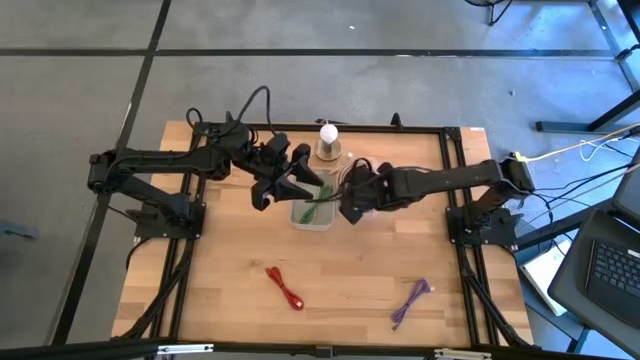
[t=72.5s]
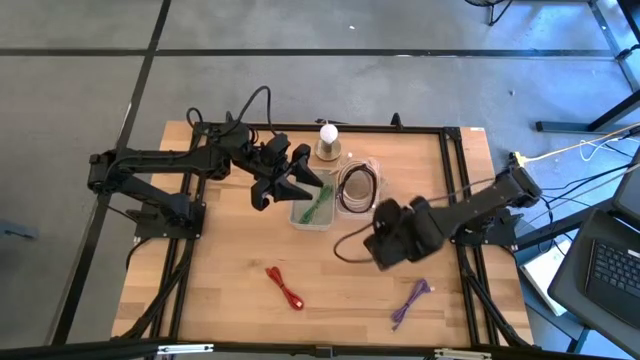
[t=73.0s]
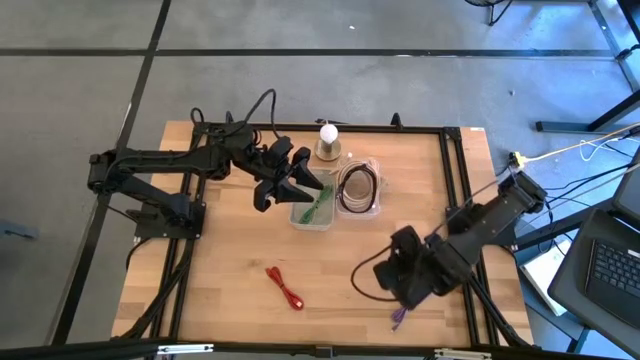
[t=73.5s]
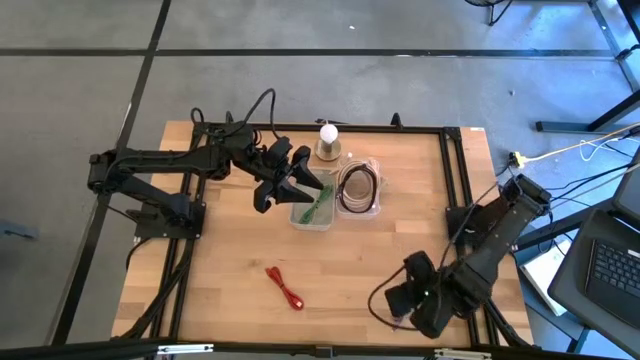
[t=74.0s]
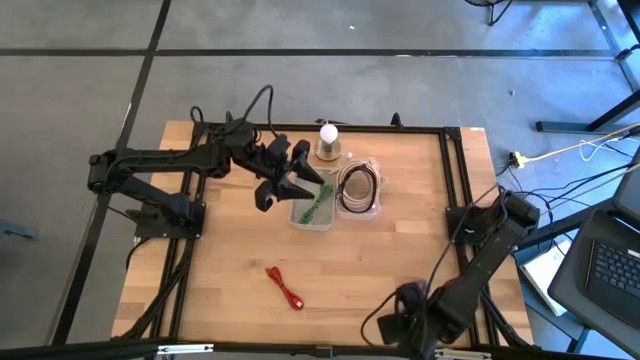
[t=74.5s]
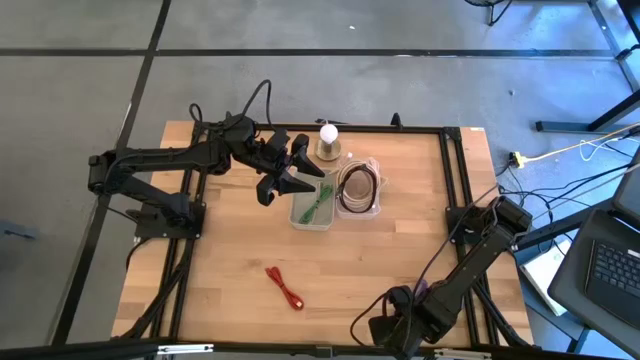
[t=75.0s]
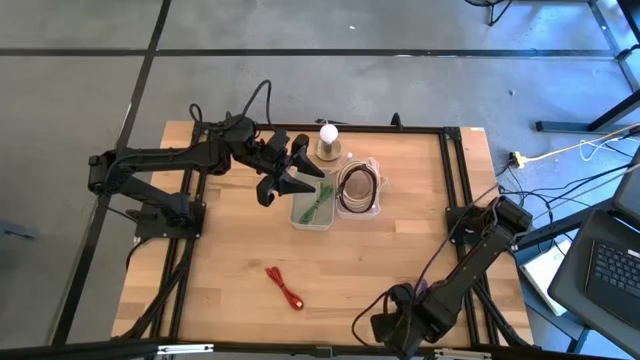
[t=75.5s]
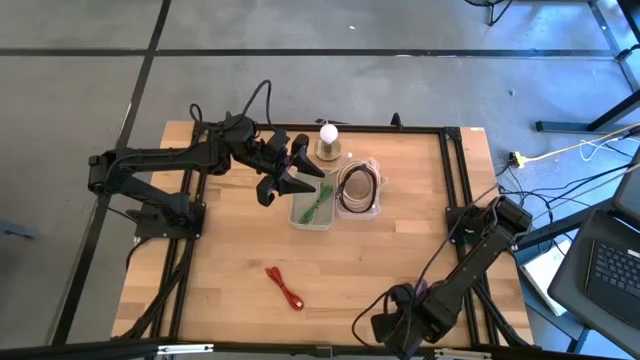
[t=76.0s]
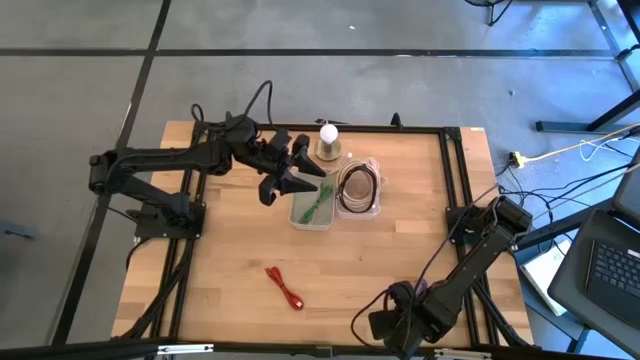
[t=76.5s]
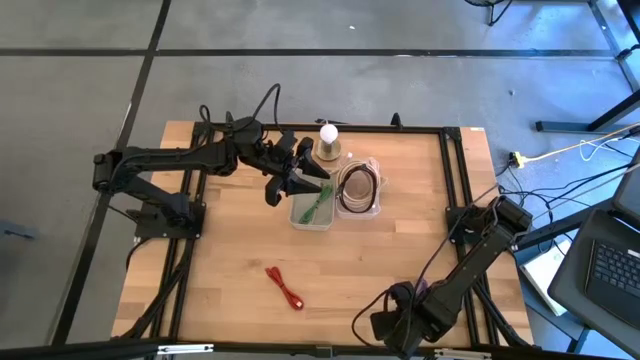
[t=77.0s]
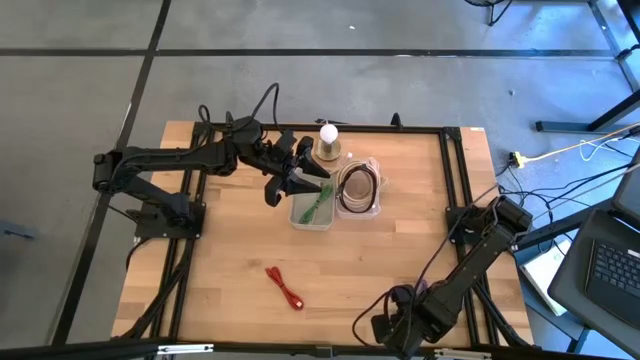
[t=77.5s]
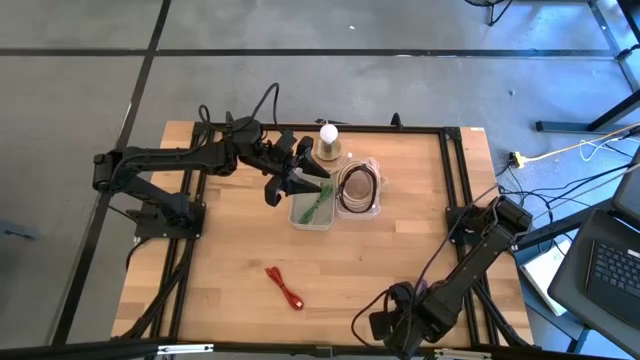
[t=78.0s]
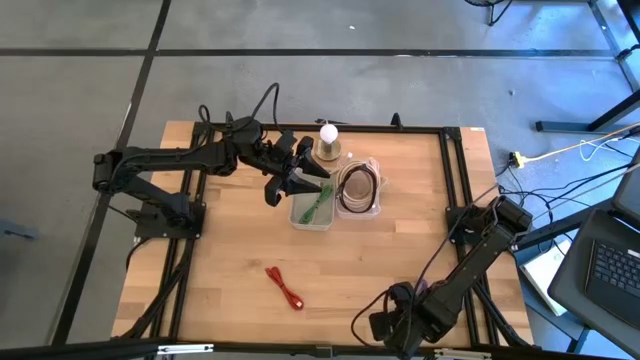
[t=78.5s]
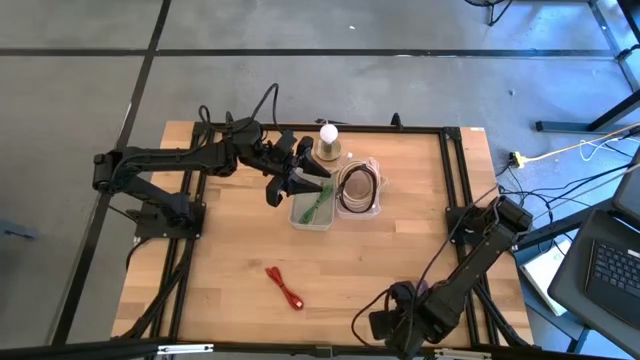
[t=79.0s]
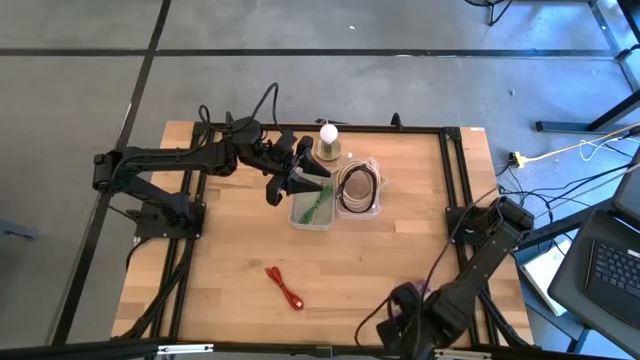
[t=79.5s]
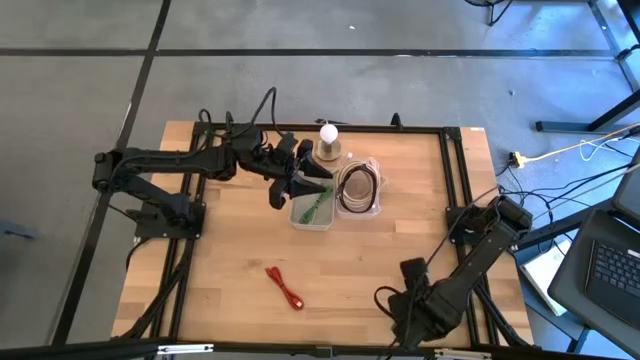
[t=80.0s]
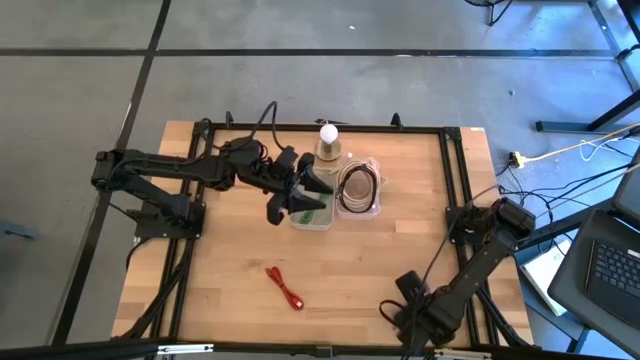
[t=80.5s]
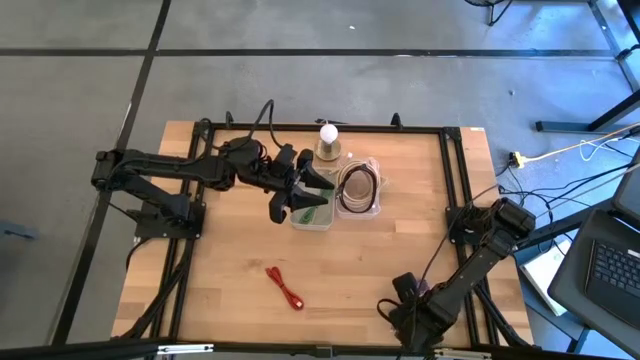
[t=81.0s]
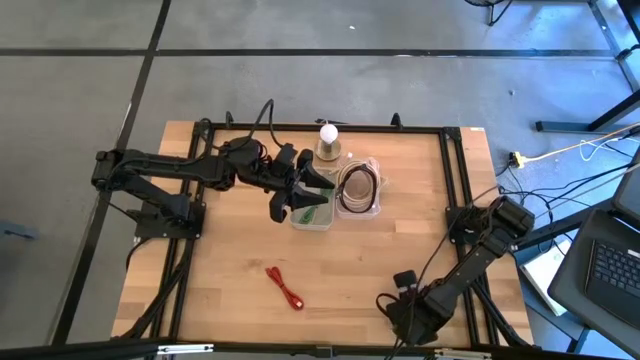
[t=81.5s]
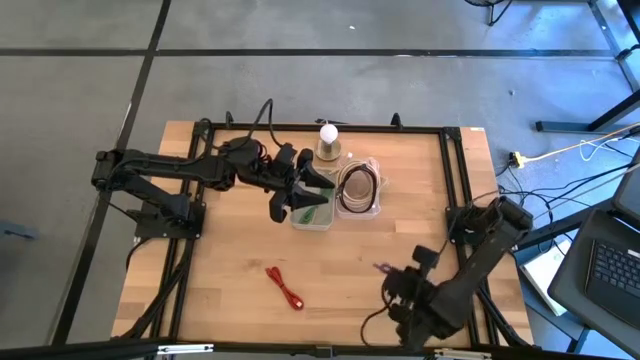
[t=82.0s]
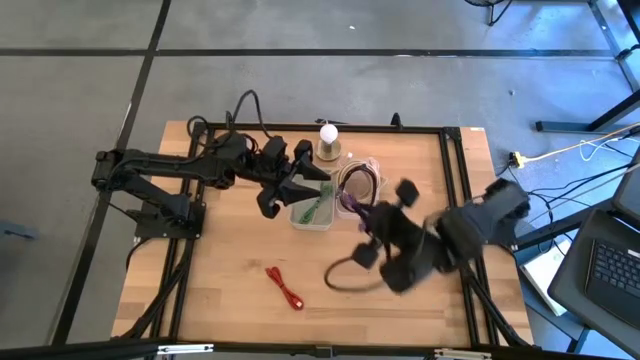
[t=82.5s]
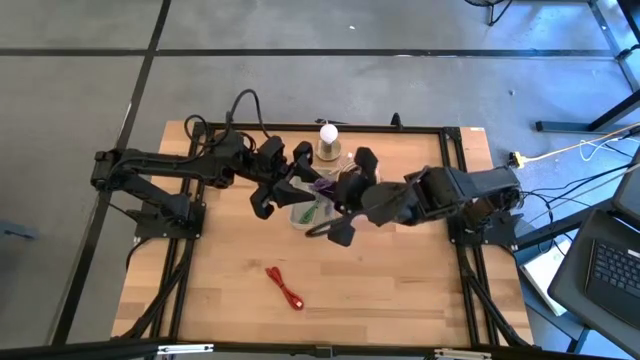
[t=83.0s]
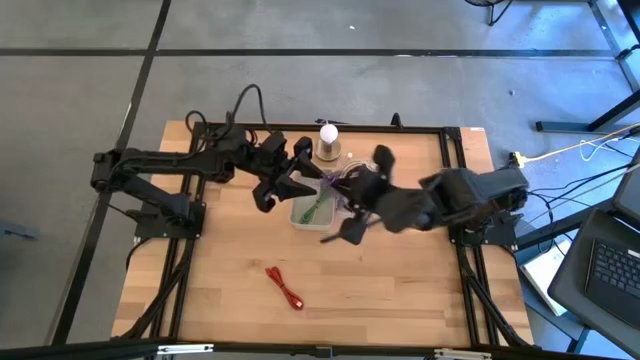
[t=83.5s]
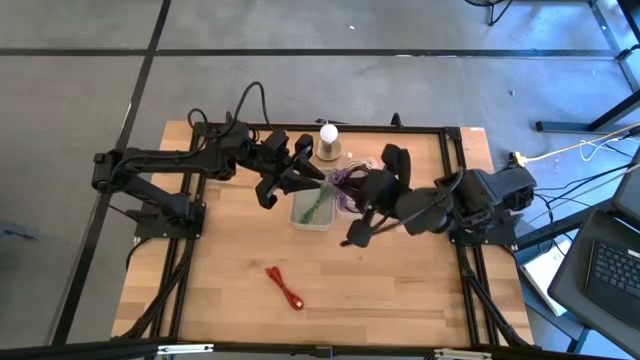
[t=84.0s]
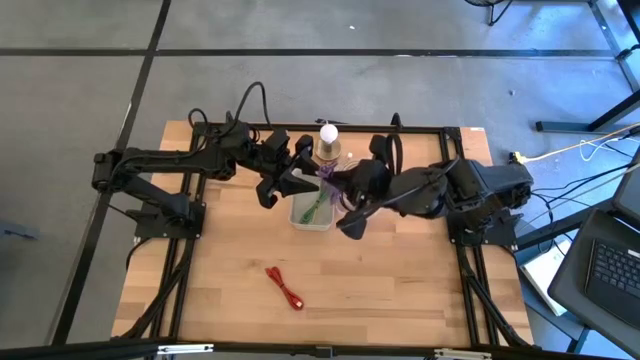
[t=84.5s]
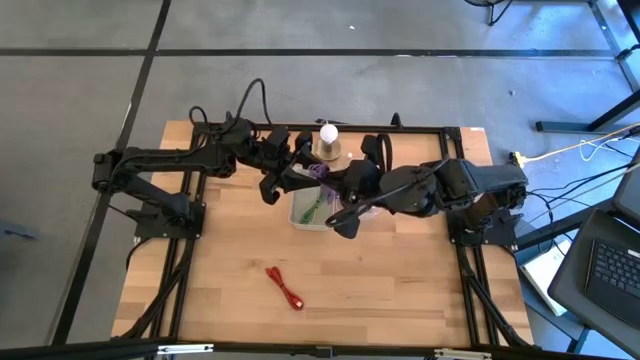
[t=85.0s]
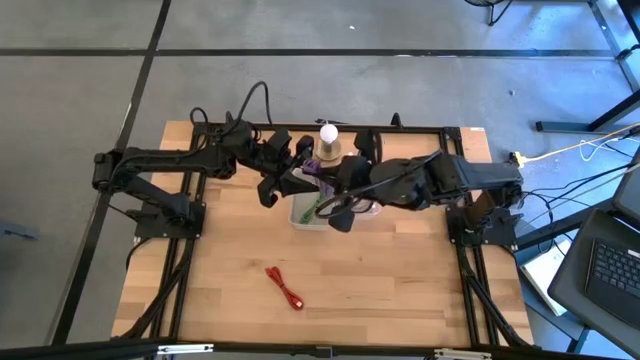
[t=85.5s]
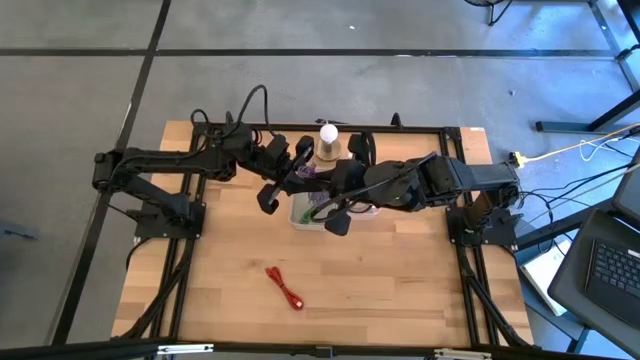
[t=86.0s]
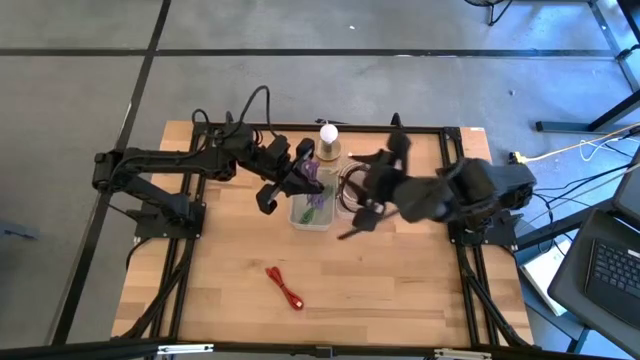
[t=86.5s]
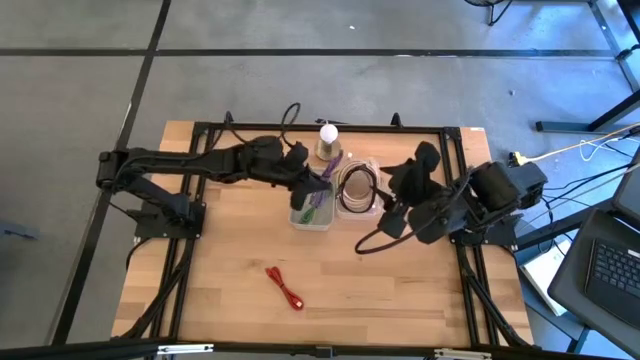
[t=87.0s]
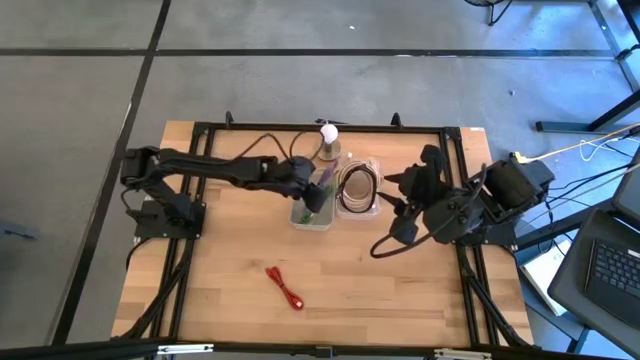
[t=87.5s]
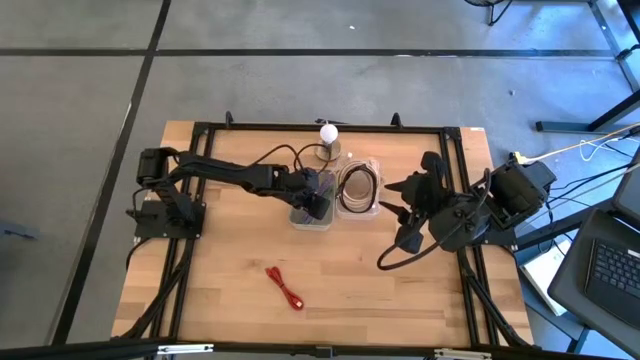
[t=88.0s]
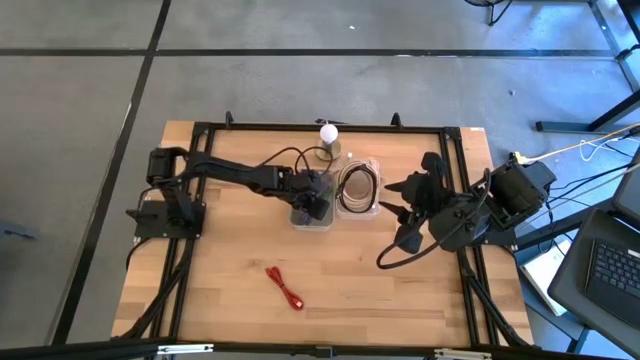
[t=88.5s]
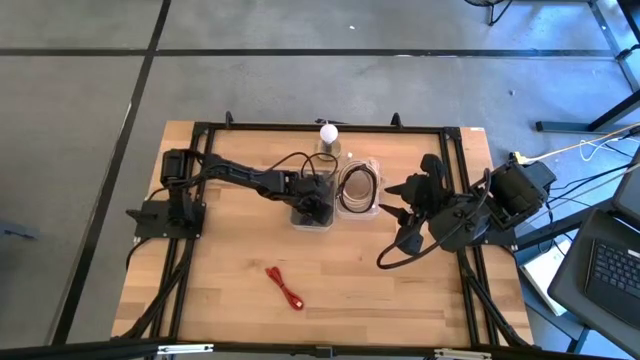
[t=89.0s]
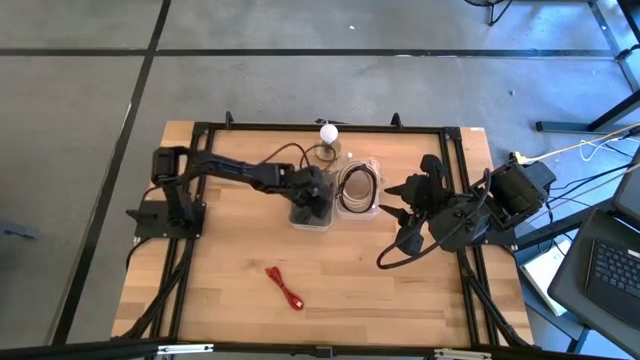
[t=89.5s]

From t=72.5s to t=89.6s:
Task: Pick and place USB-C Cables
Put the violet charger cable into the gray bin

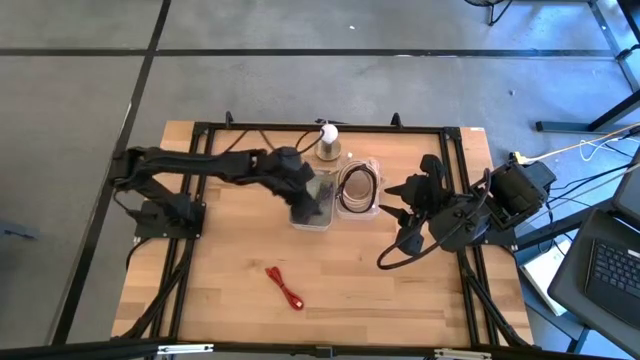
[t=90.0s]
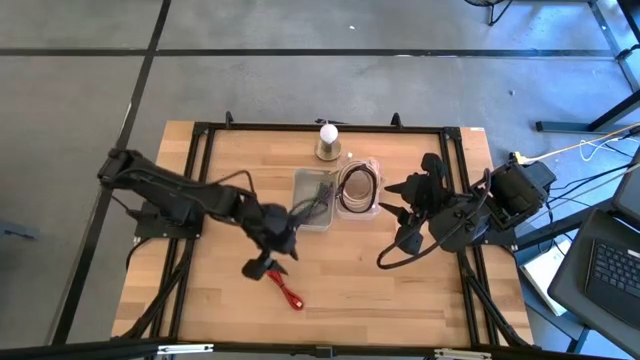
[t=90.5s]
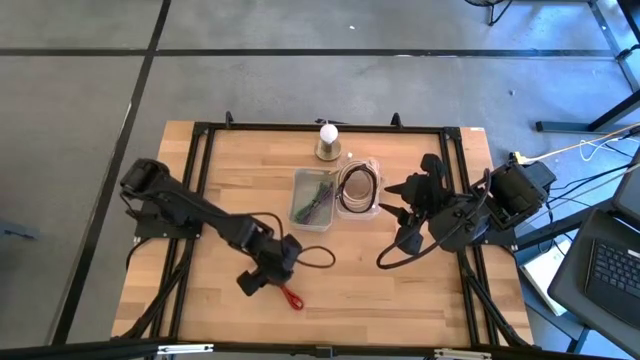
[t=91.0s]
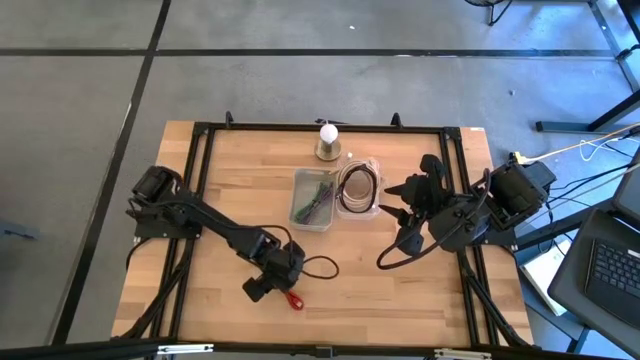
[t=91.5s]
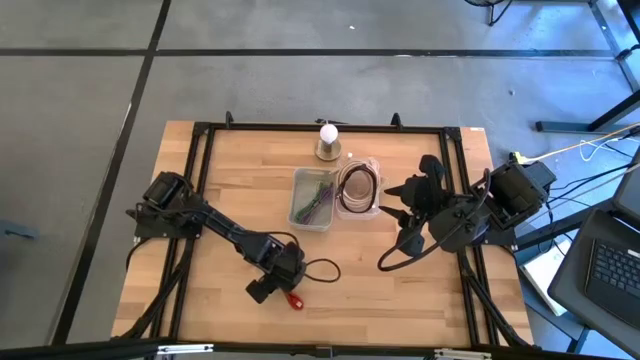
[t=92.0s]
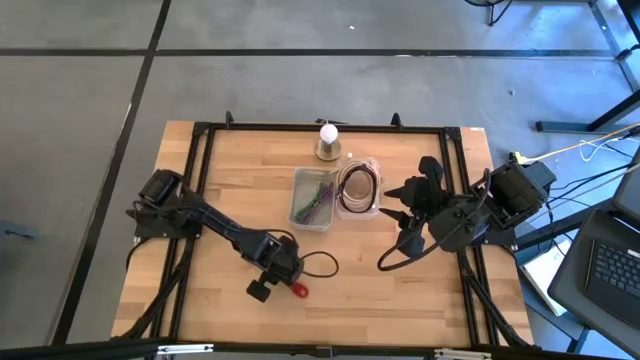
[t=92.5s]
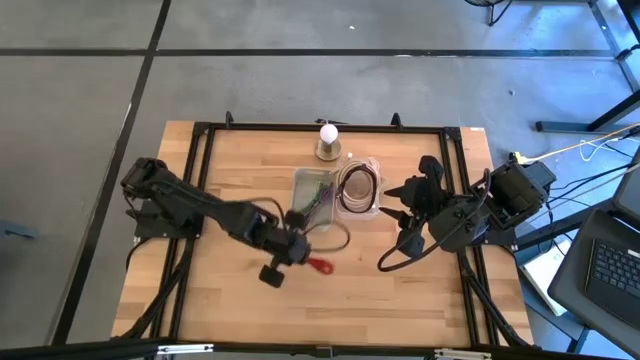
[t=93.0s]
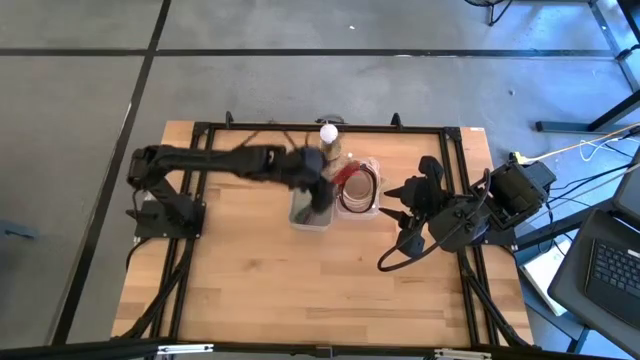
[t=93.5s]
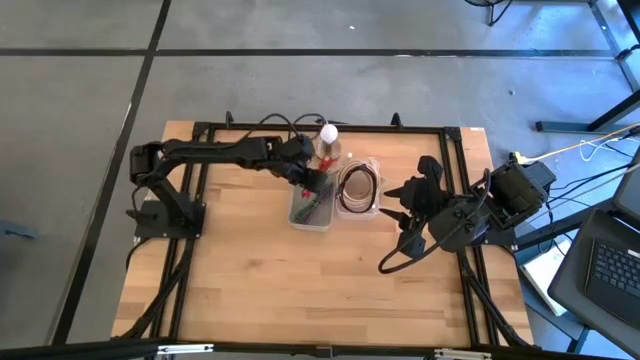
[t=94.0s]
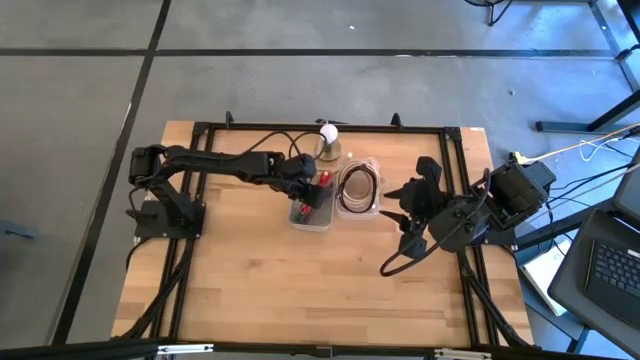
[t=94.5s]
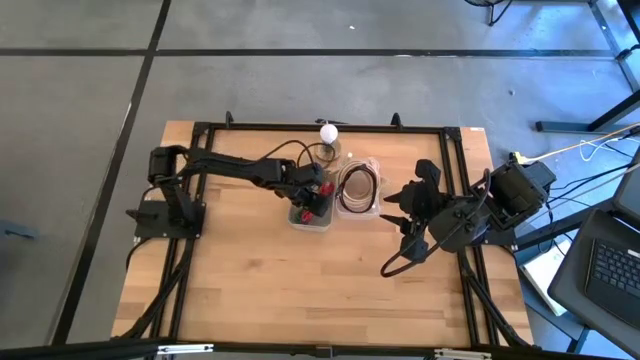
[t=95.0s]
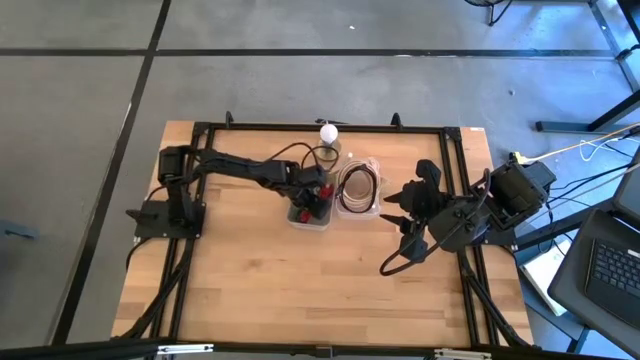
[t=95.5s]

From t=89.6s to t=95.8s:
Put the red charger cable into the gray bin
